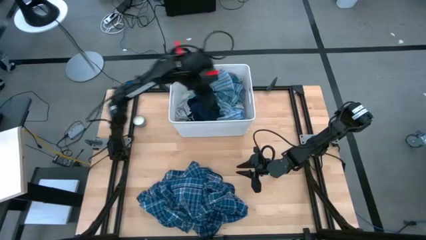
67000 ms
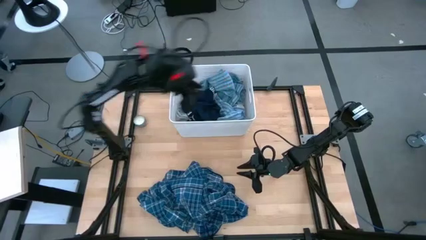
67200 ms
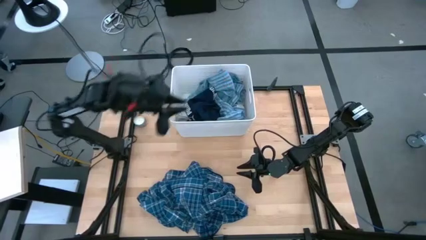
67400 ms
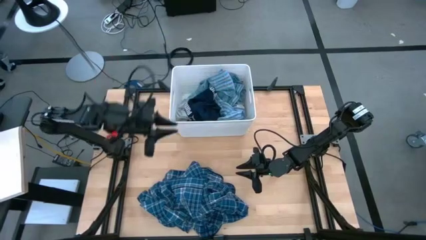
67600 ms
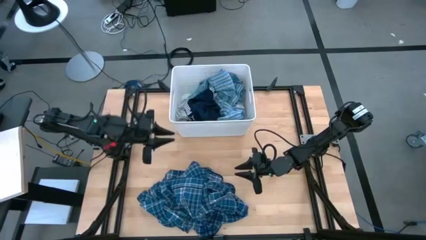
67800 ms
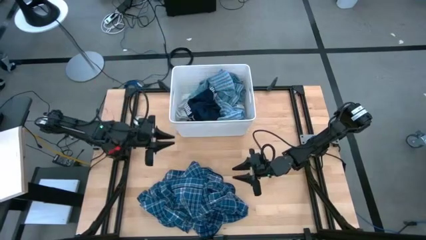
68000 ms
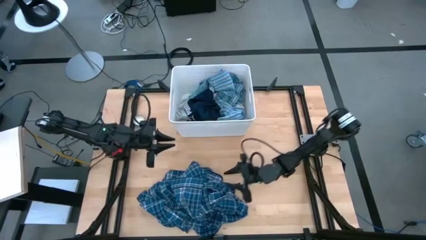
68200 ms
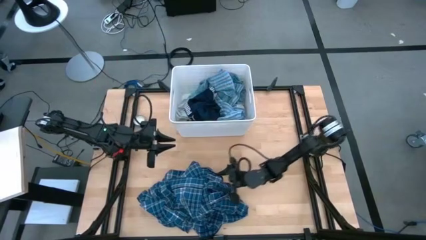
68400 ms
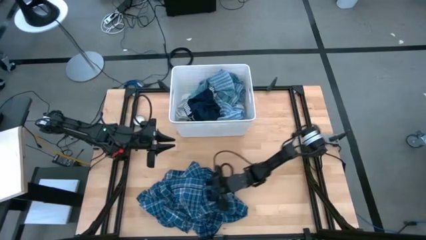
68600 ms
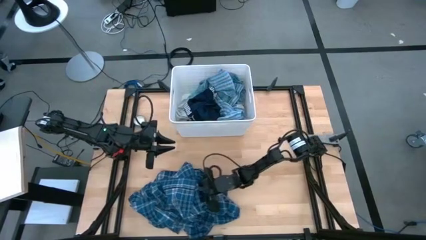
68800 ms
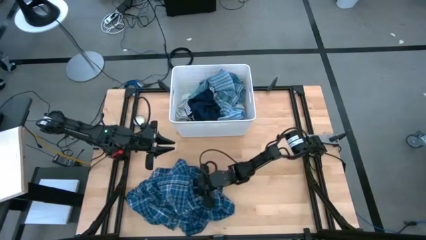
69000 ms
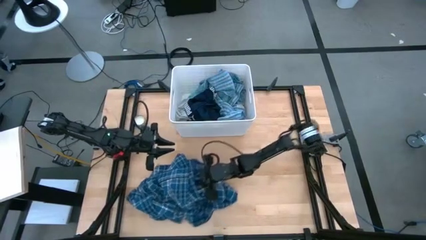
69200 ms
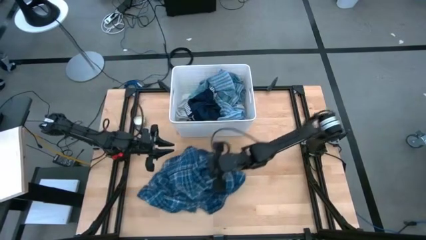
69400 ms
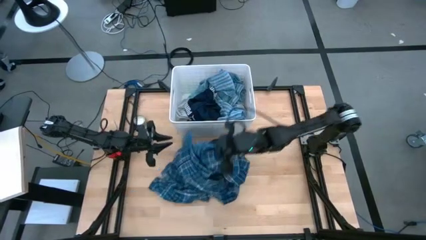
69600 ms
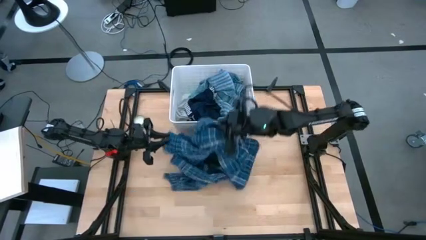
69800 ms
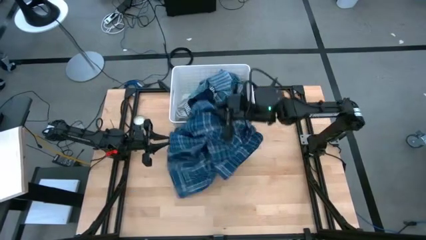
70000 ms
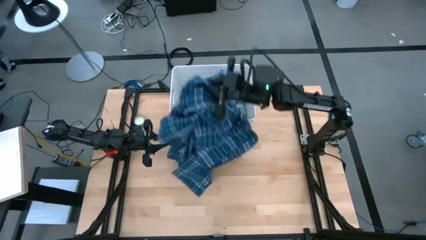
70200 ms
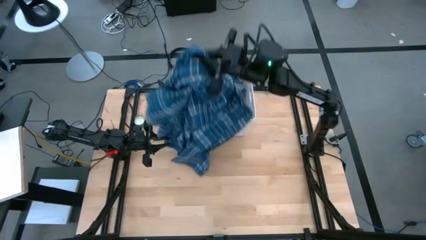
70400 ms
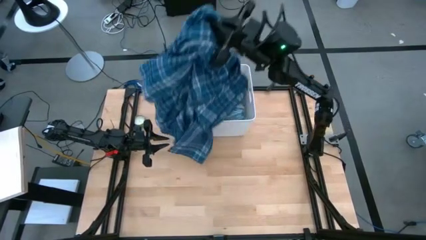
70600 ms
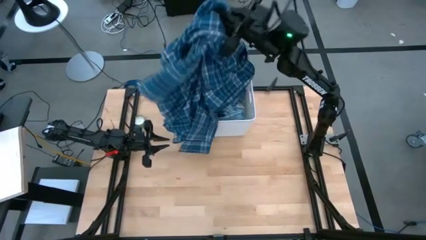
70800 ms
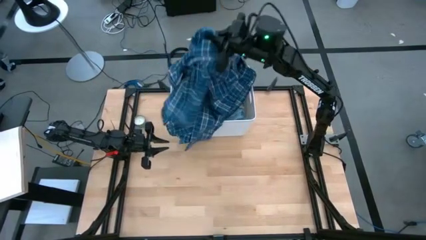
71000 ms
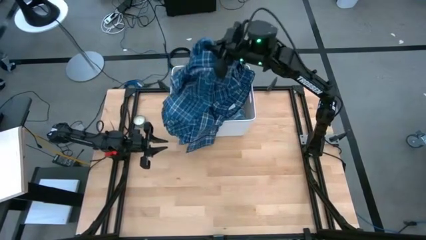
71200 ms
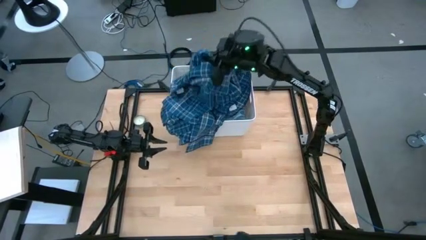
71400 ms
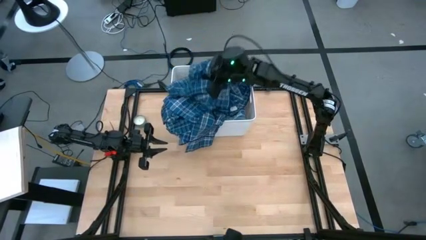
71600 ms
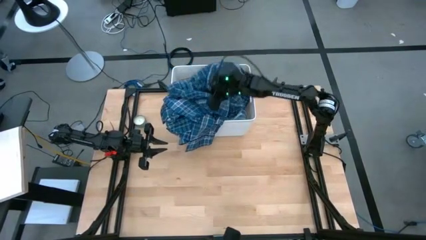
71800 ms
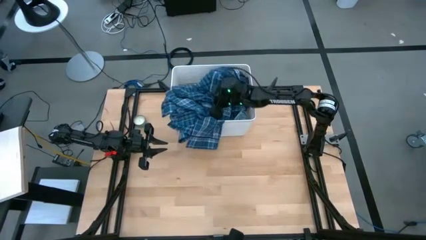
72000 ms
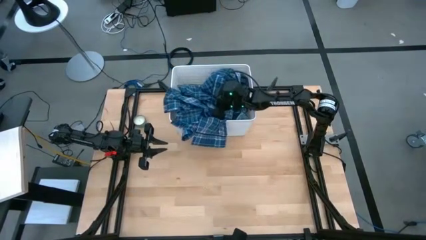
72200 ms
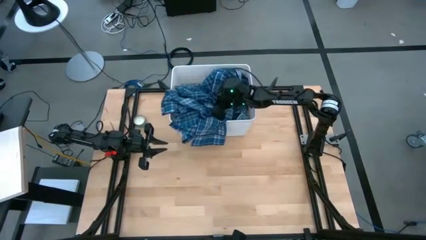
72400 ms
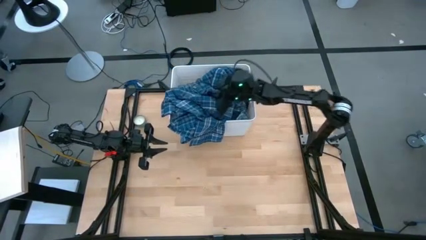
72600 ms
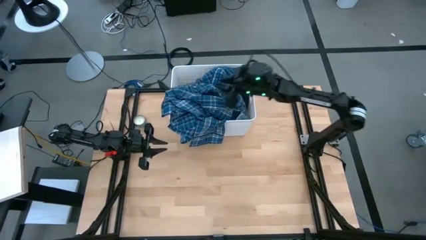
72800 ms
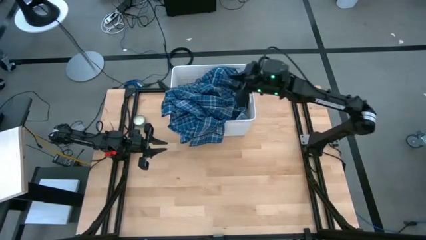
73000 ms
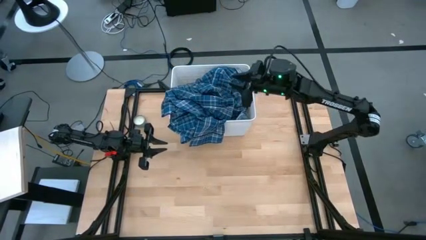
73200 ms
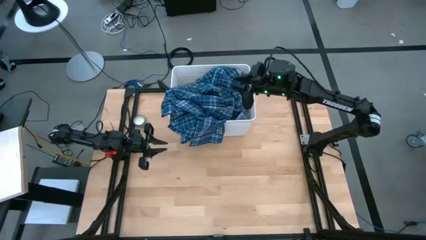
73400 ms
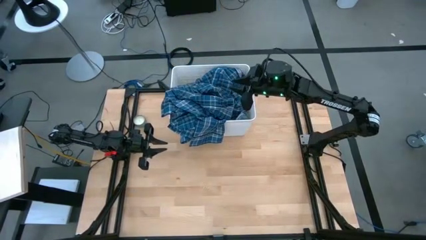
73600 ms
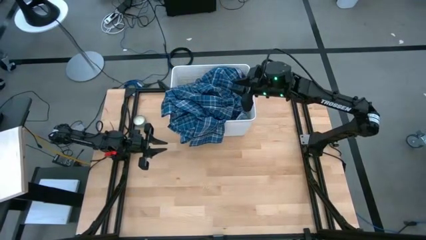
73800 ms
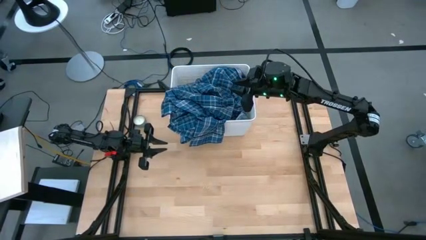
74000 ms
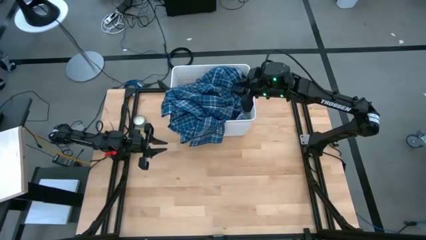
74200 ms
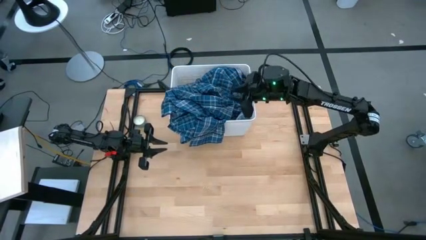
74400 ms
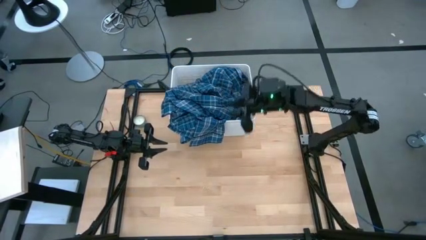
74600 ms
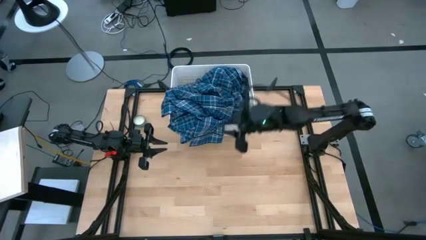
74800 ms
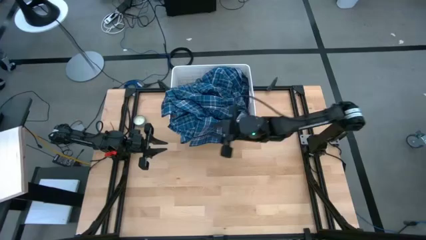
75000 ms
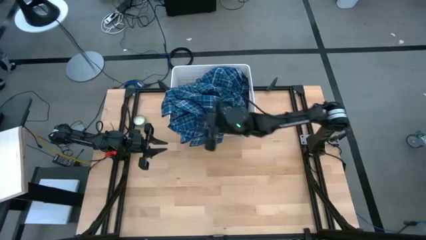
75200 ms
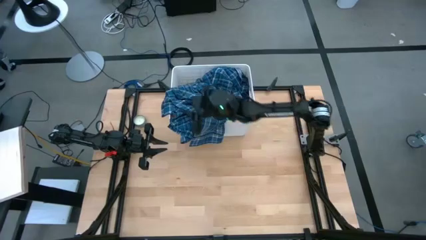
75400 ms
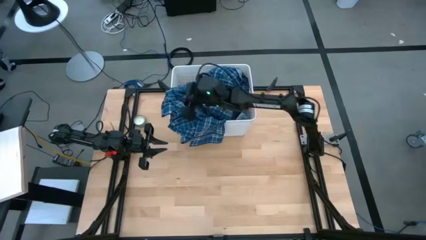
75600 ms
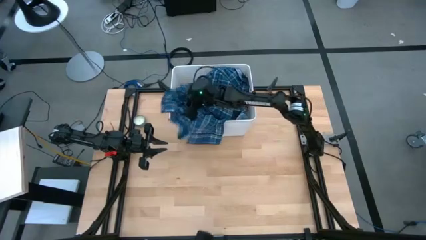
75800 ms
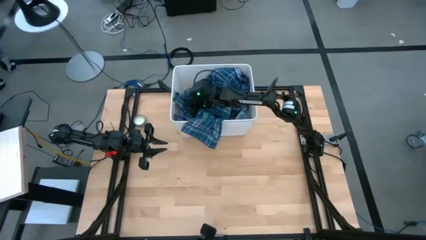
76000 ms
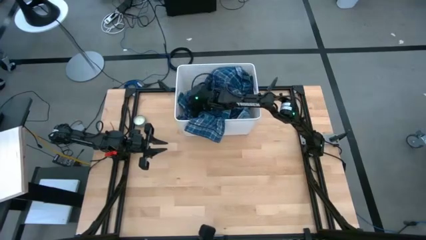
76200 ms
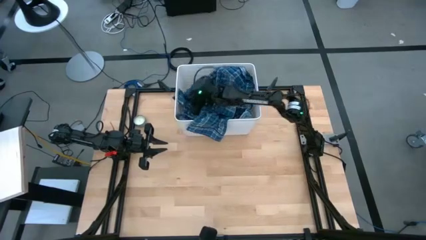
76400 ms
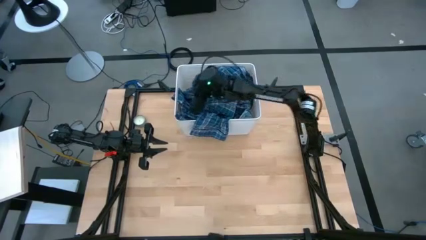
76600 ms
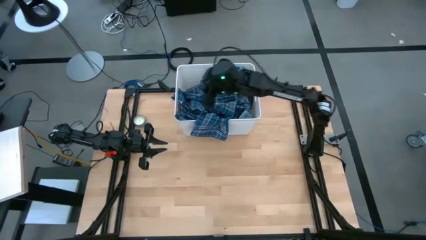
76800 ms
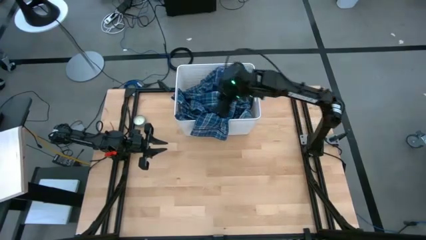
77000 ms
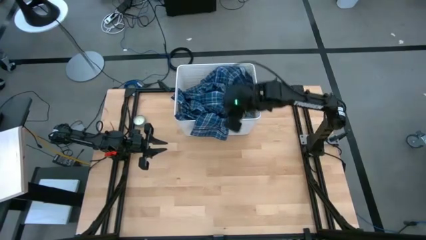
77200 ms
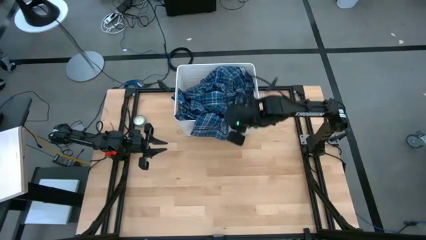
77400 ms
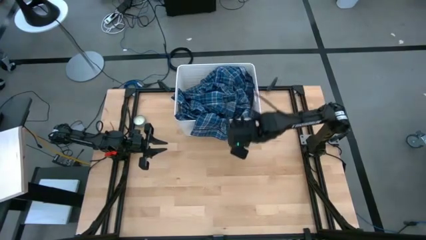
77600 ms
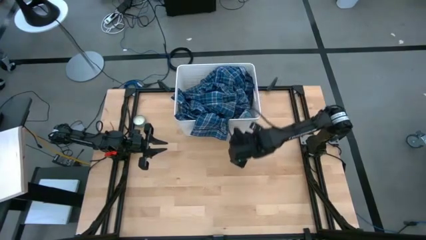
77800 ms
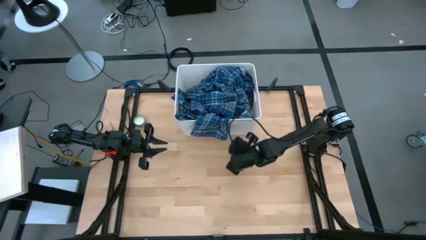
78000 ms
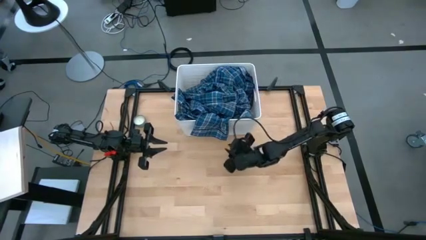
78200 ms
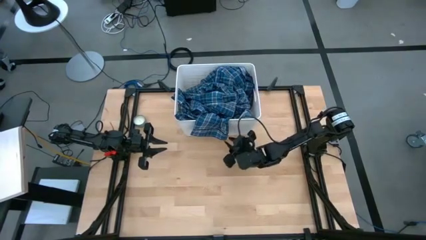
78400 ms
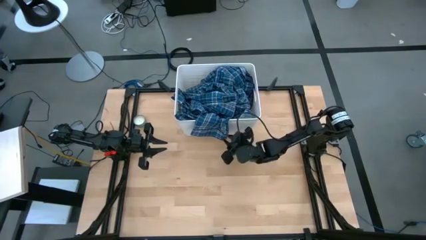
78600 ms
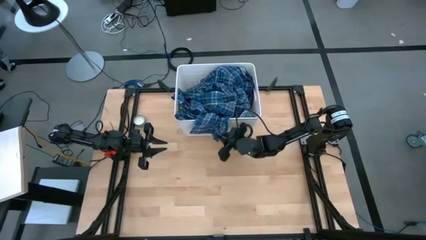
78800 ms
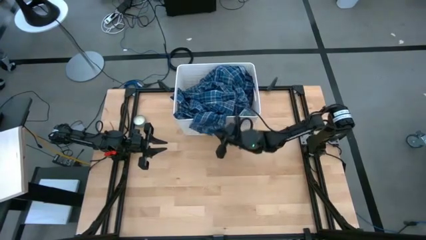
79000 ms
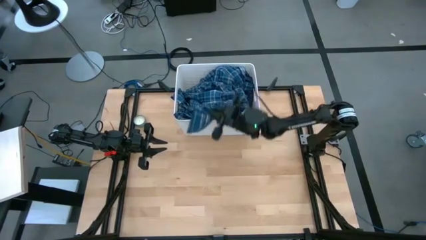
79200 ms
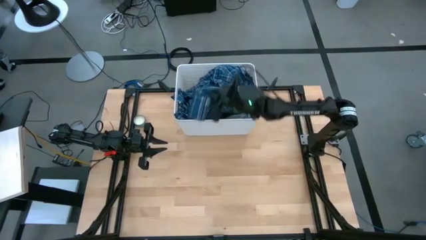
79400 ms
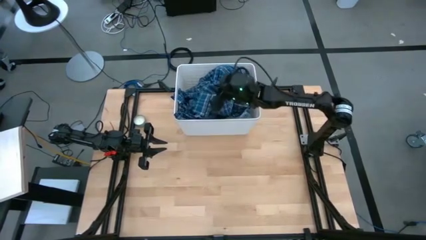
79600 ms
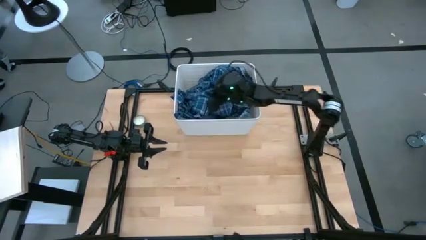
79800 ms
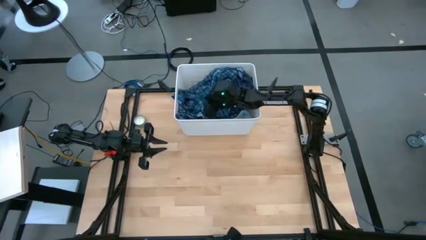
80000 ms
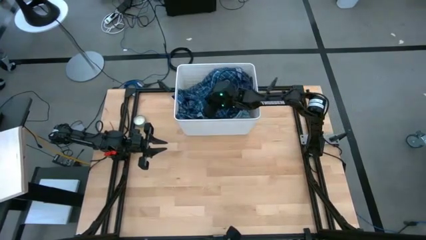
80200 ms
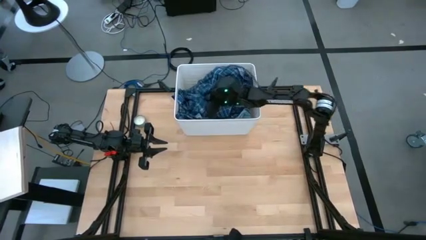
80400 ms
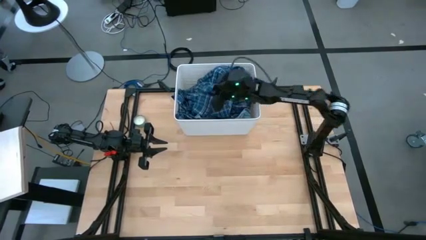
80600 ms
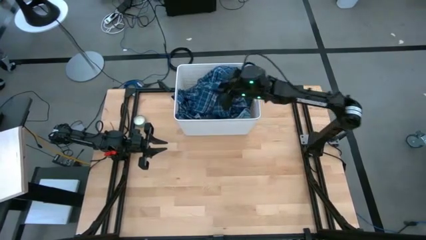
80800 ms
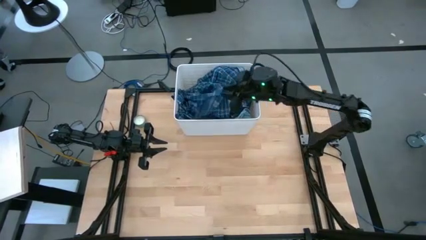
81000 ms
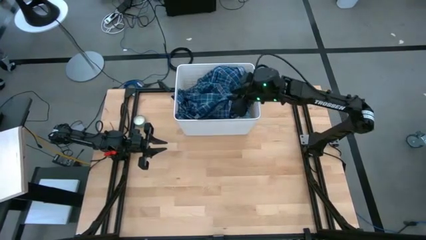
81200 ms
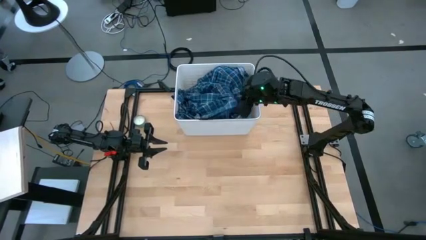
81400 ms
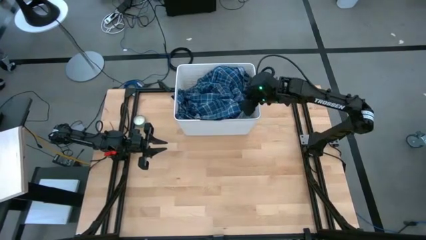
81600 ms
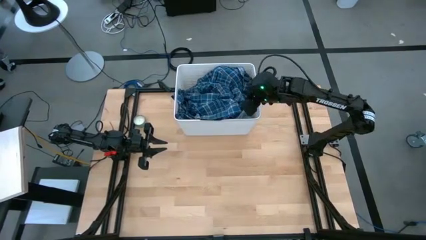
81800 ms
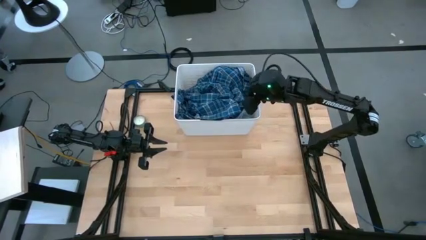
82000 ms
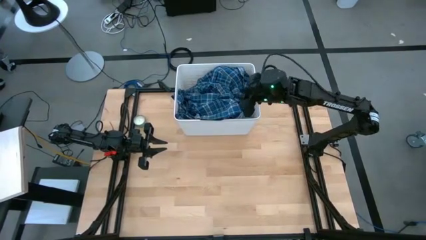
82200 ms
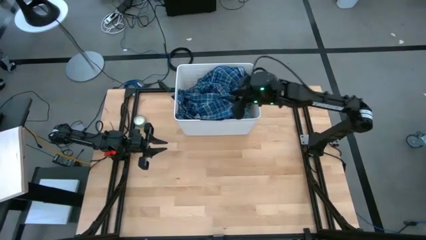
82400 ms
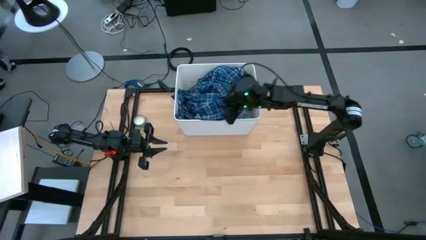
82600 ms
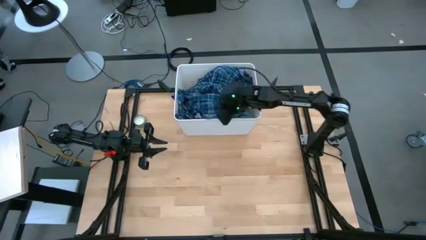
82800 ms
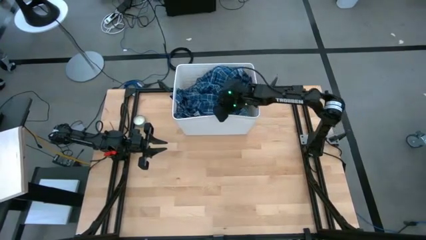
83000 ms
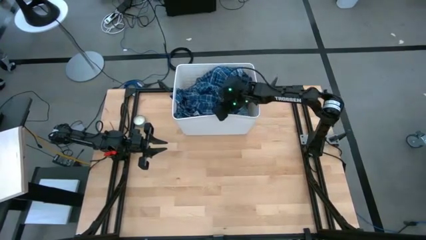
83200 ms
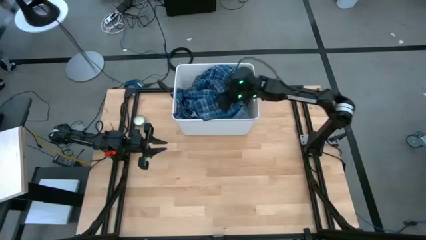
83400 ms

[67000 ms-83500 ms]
Task: Sort clothes
Put the blue and white patterned shirt into the white laundry bin
